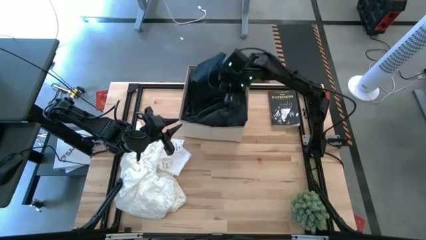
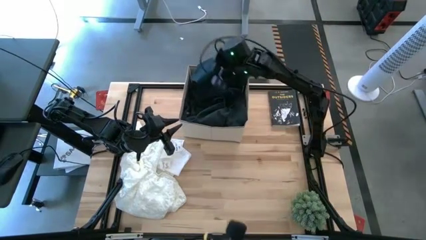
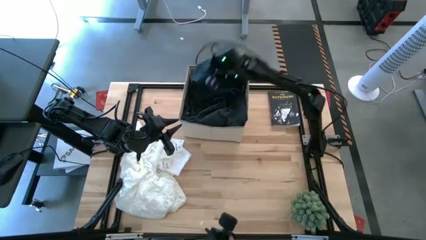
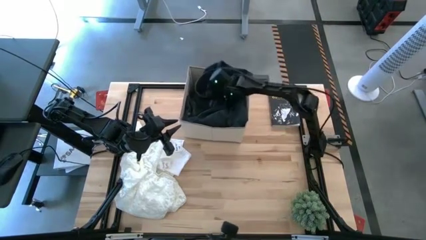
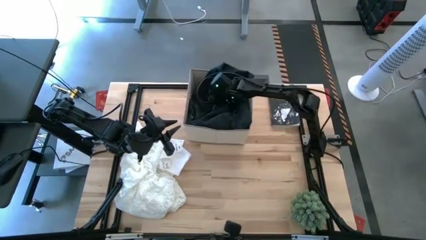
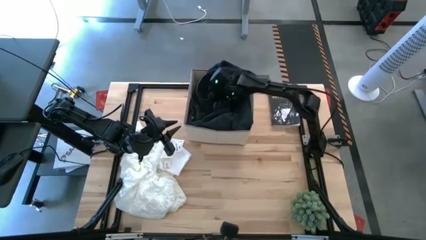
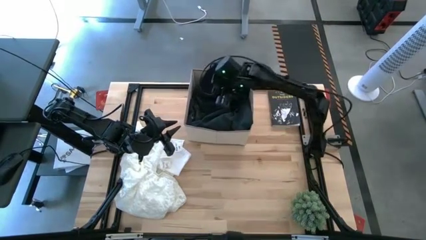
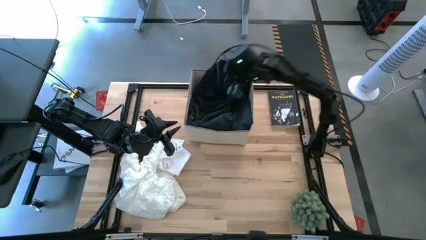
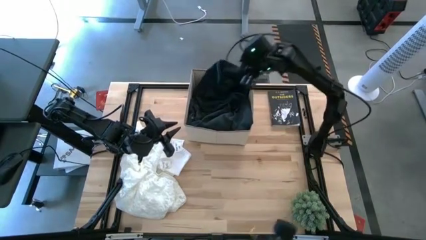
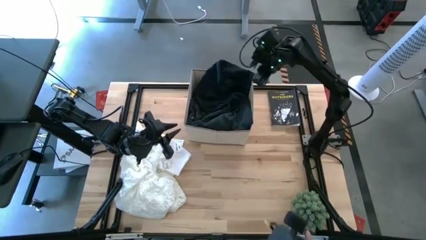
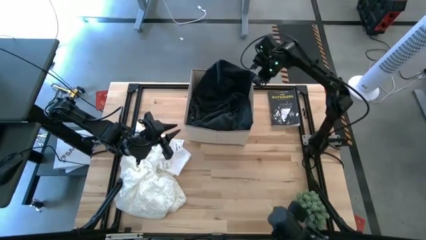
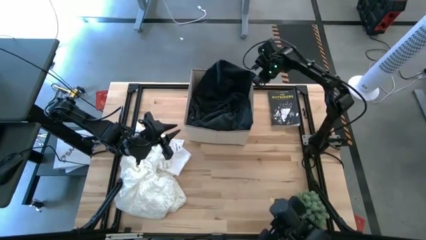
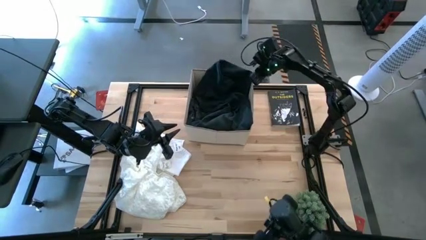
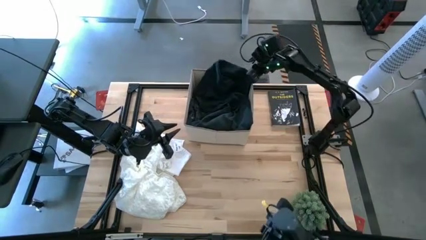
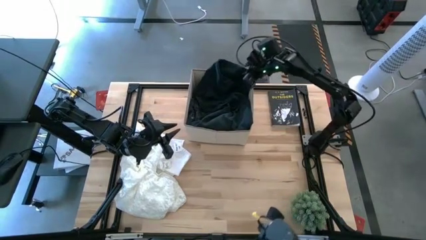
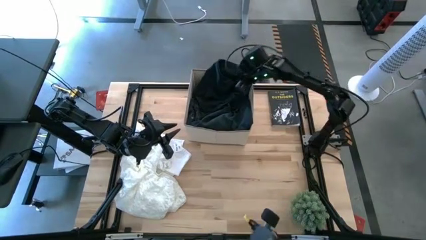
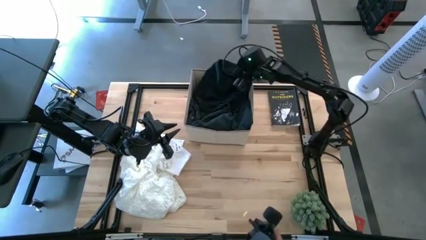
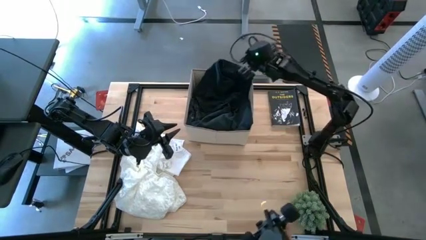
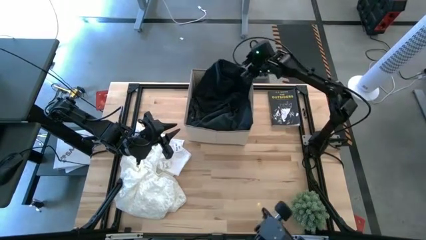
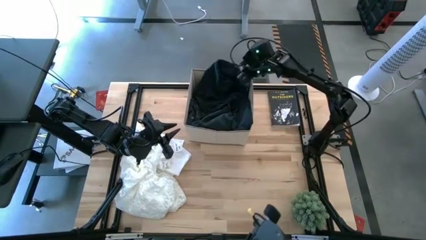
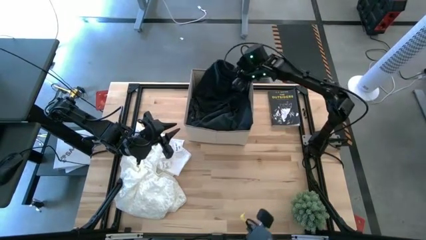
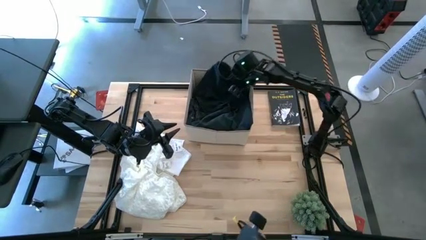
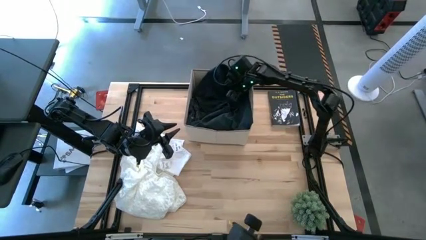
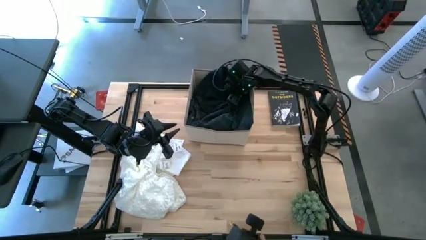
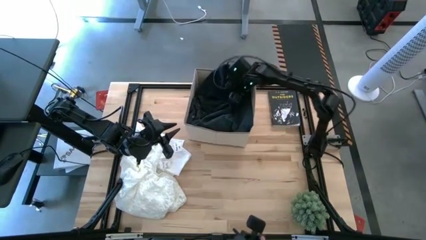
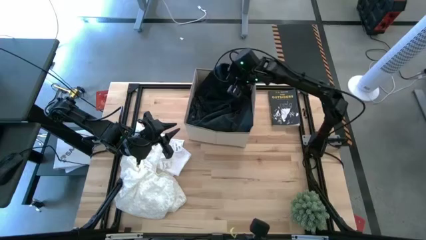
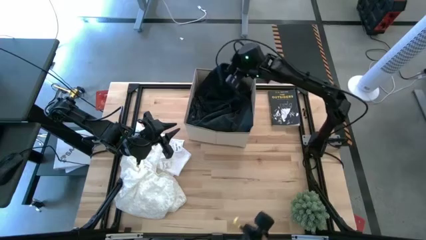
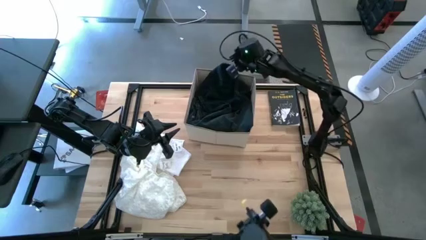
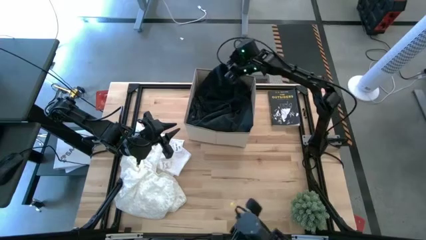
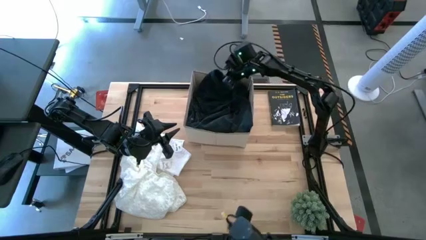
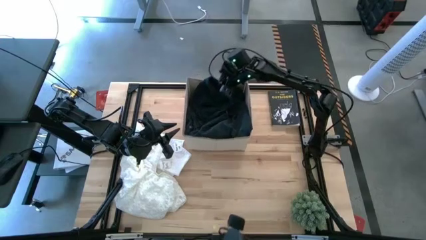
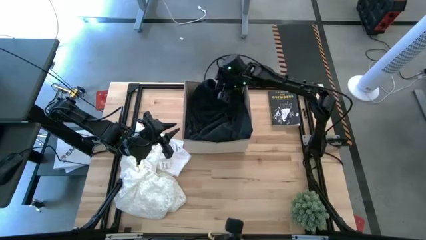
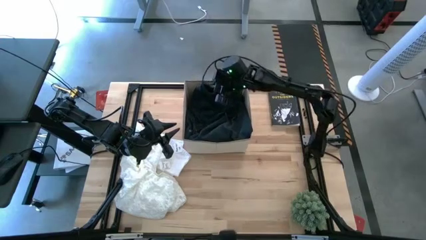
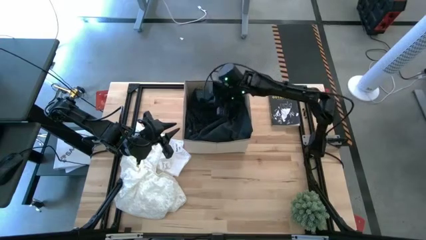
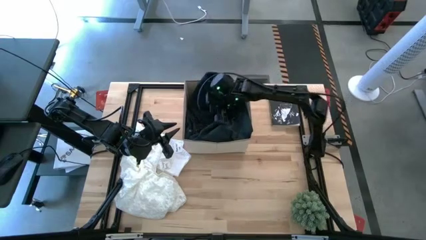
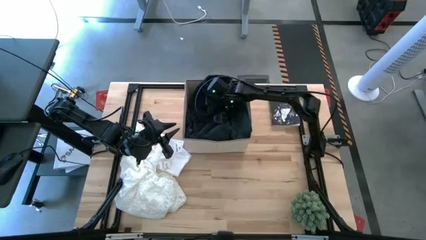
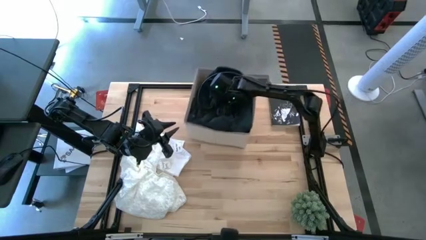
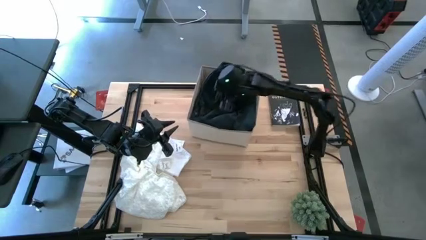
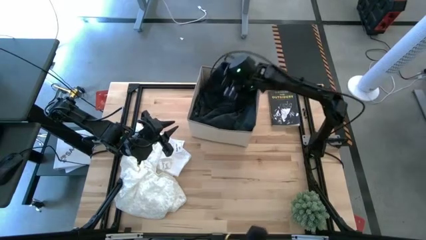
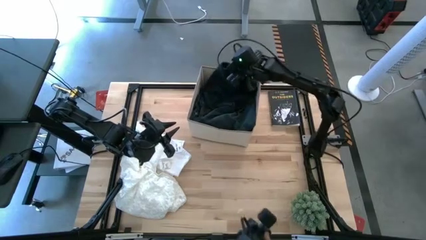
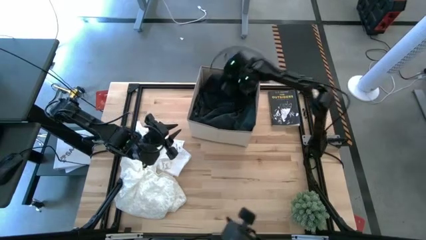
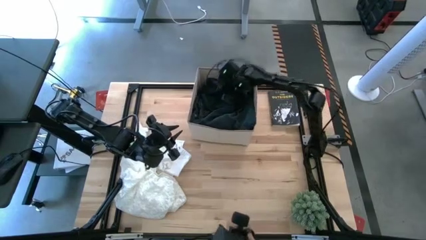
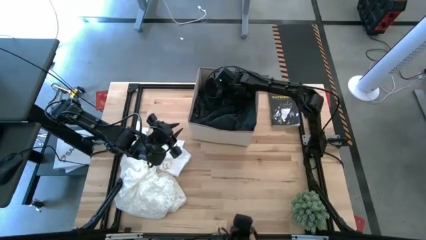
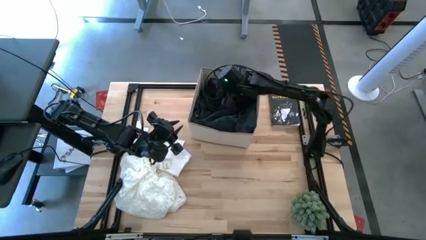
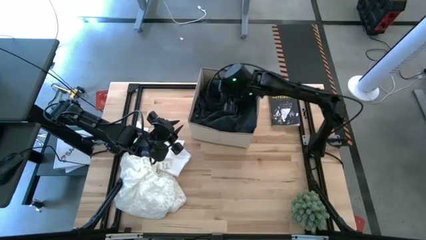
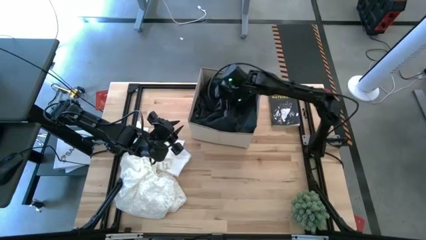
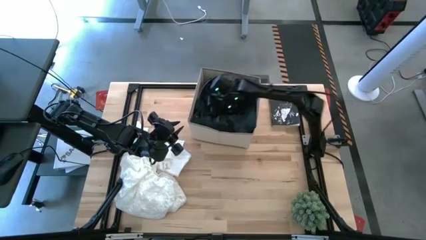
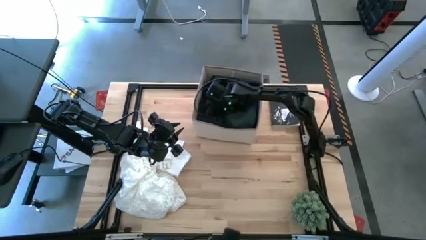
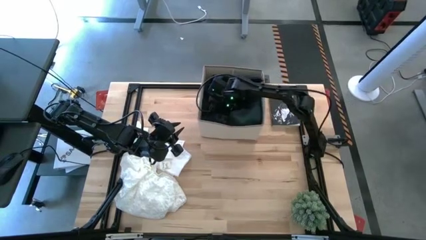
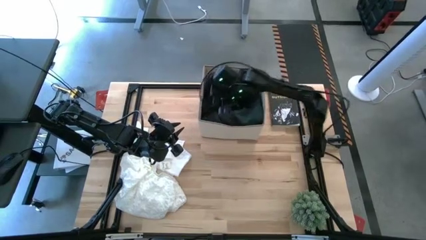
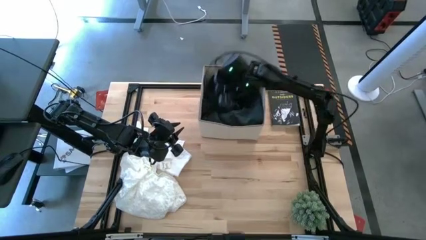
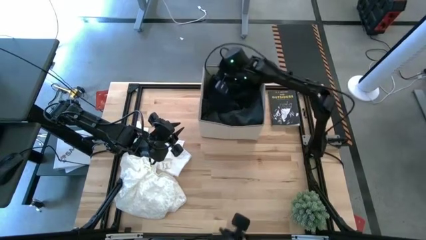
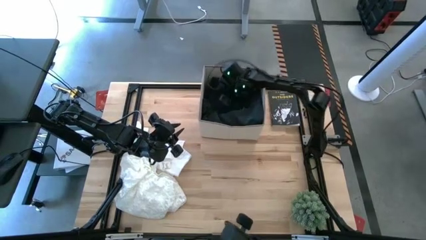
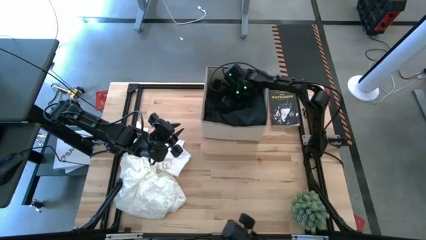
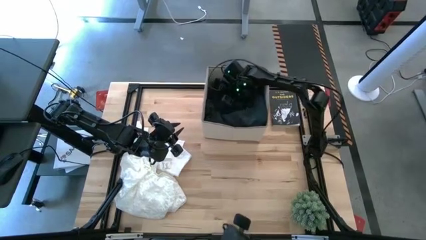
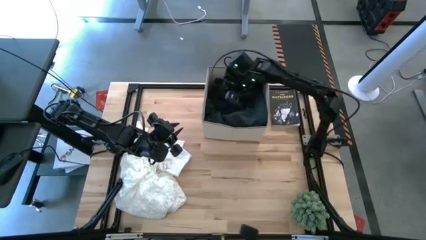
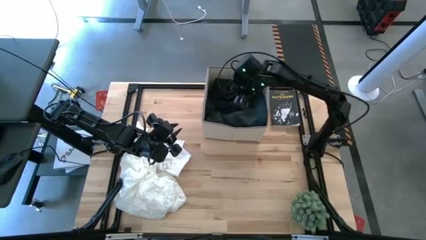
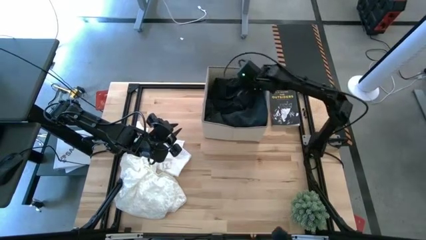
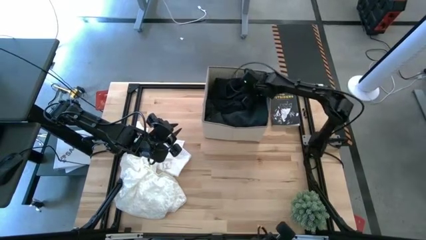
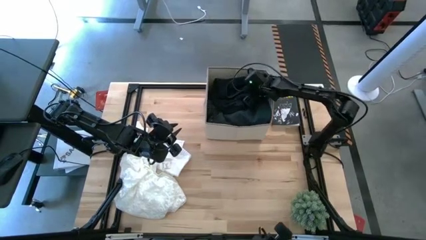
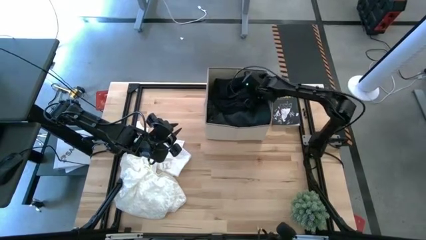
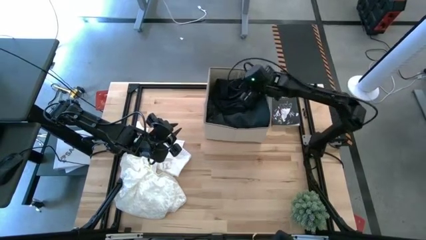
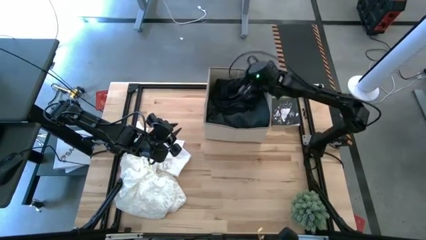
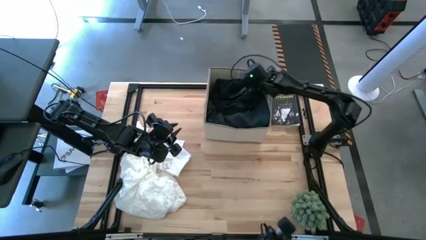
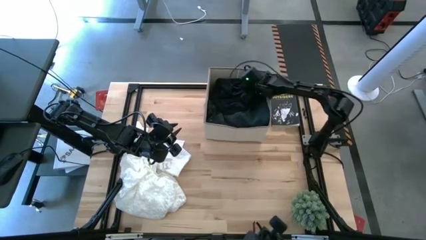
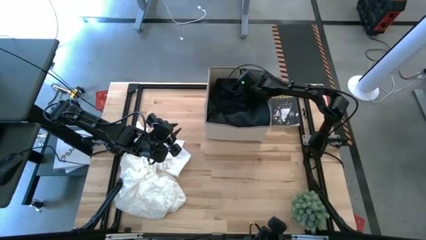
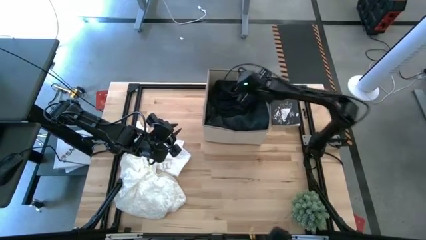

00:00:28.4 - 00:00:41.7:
Task: Sort clothes
Adjust the dark blue pants in the laundry organizer

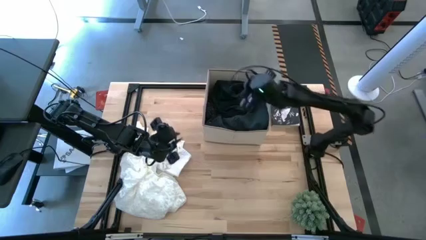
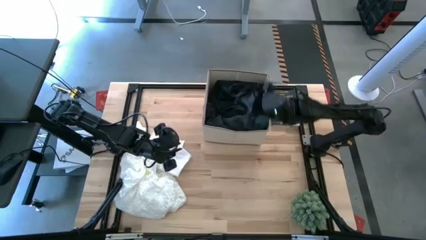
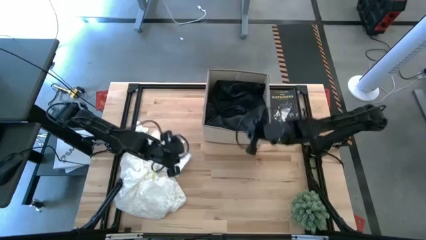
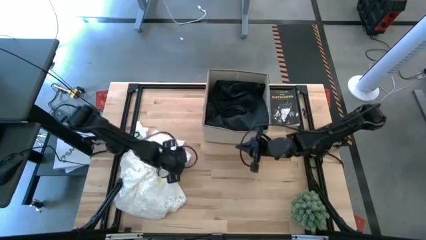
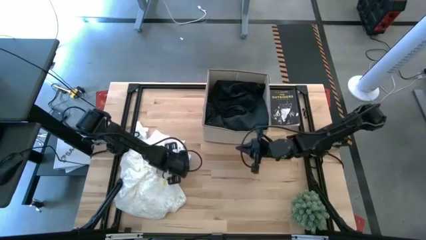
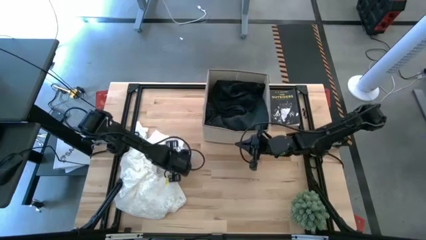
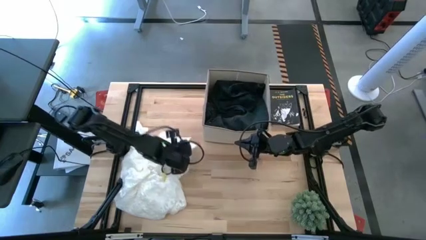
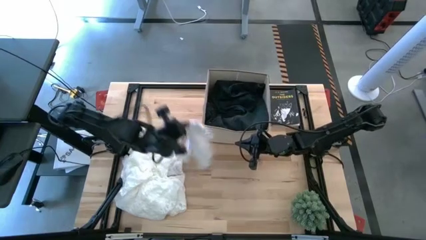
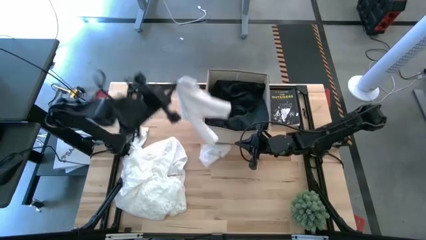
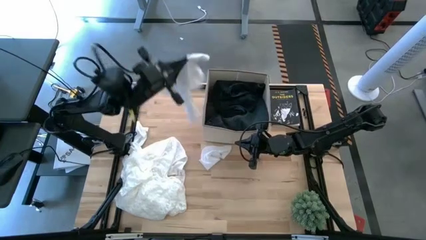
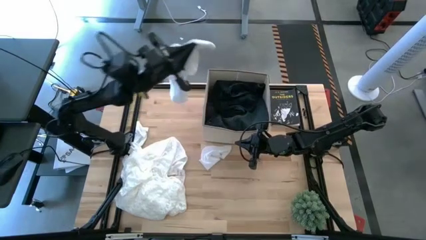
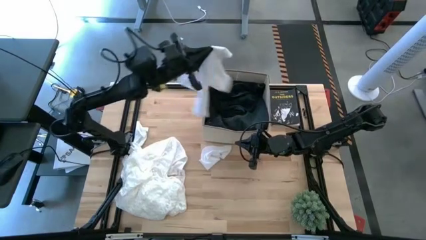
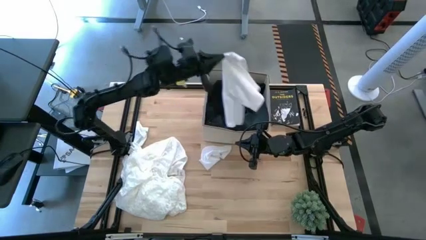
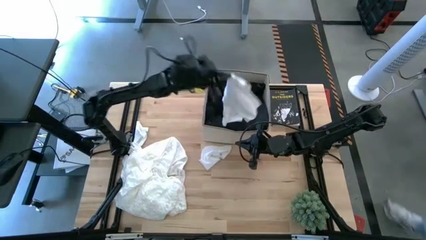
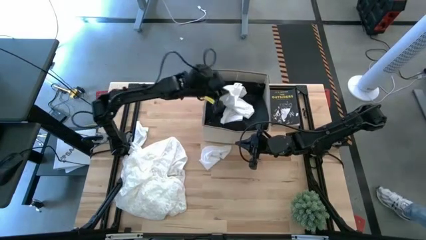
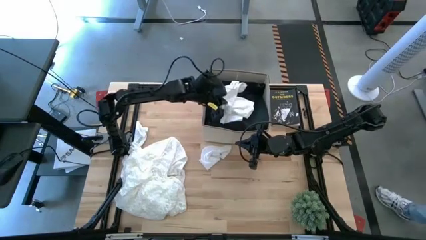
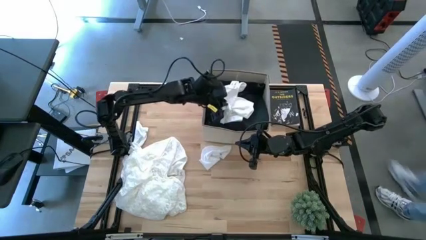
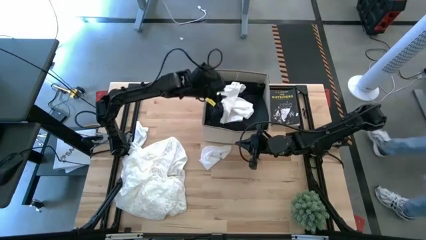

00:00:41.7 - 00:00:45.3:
Put the white underwear into the laundry organizer
